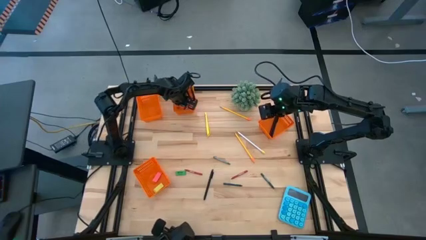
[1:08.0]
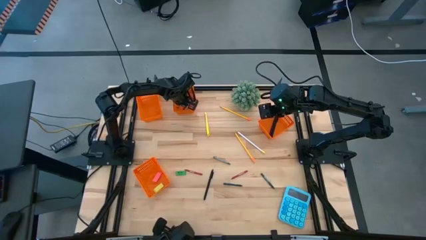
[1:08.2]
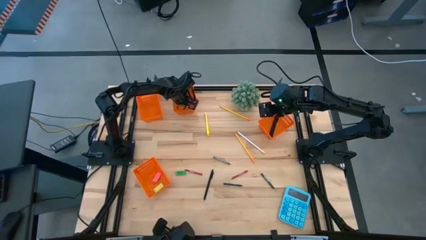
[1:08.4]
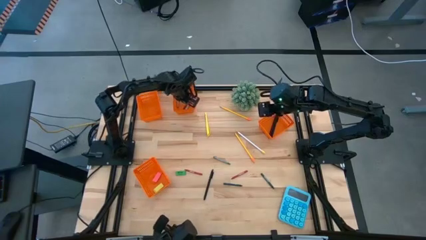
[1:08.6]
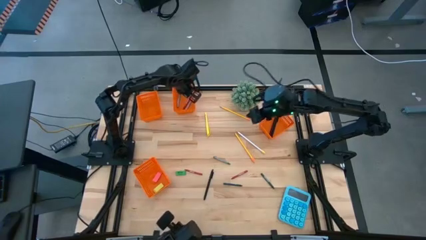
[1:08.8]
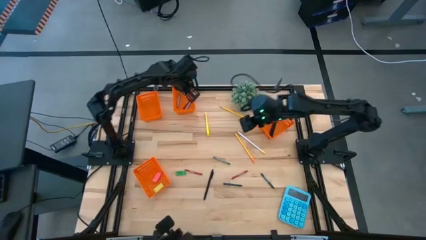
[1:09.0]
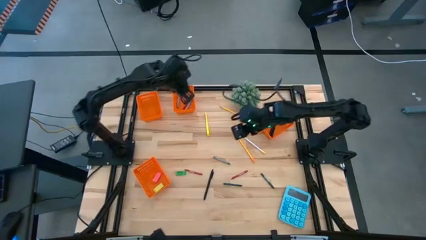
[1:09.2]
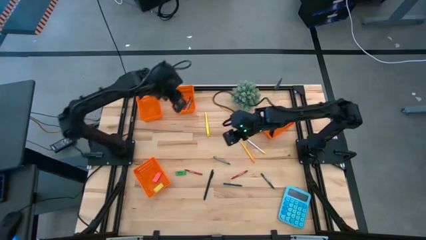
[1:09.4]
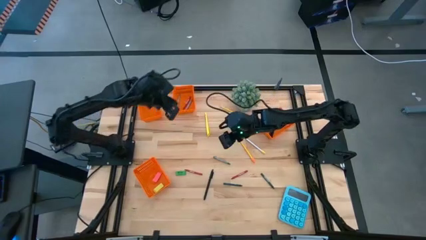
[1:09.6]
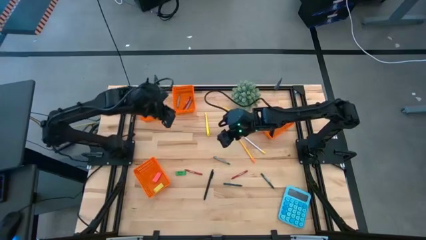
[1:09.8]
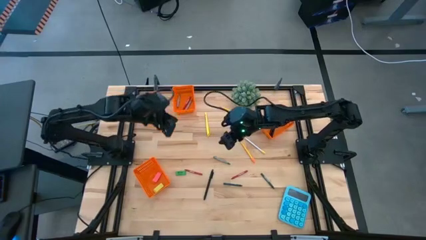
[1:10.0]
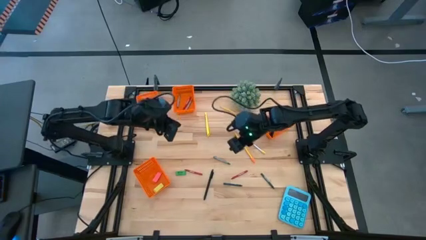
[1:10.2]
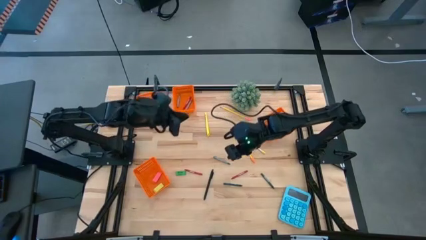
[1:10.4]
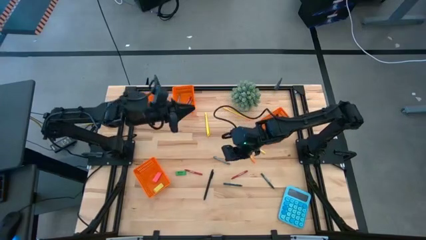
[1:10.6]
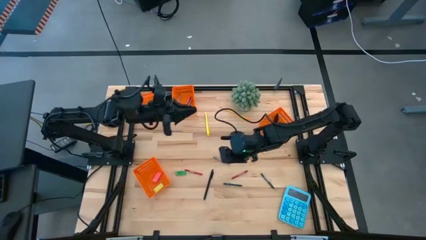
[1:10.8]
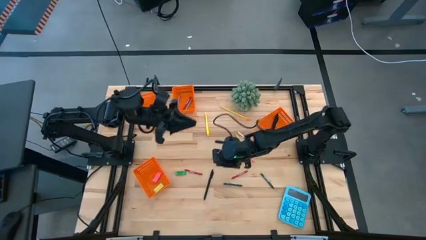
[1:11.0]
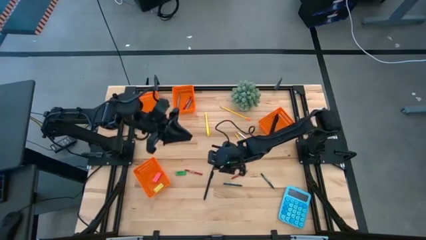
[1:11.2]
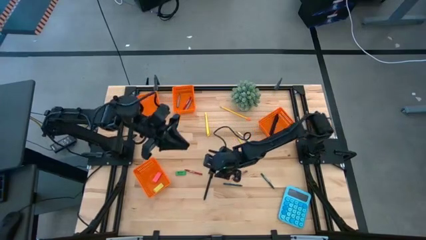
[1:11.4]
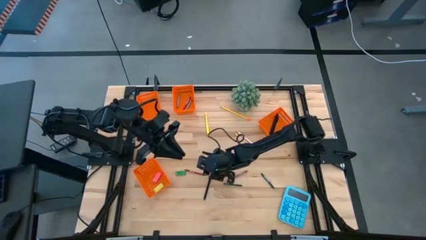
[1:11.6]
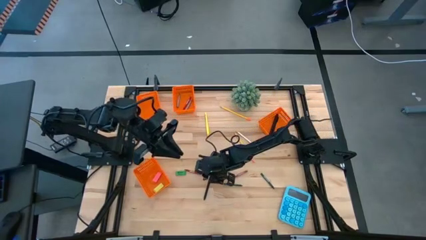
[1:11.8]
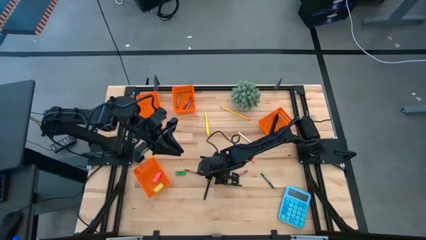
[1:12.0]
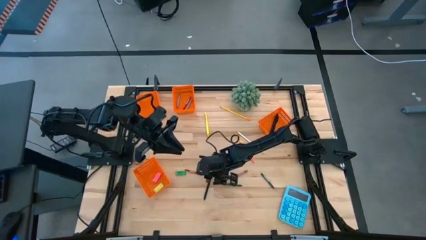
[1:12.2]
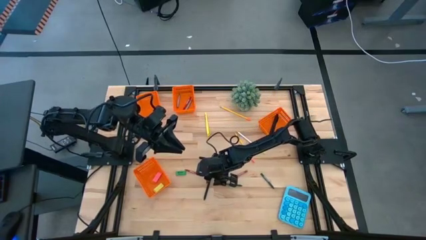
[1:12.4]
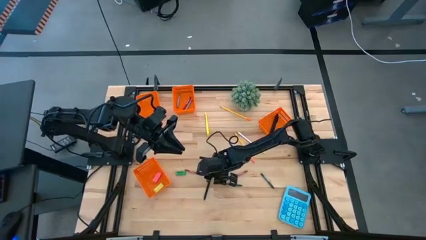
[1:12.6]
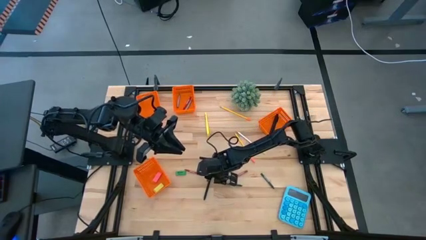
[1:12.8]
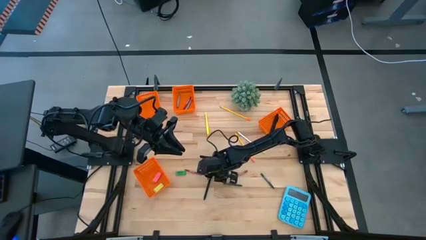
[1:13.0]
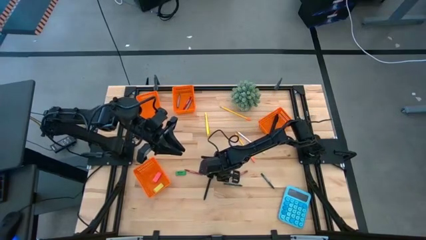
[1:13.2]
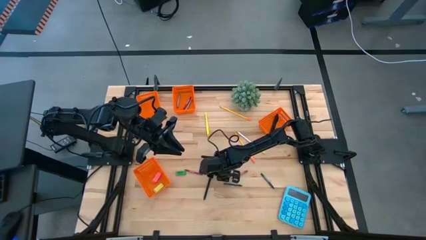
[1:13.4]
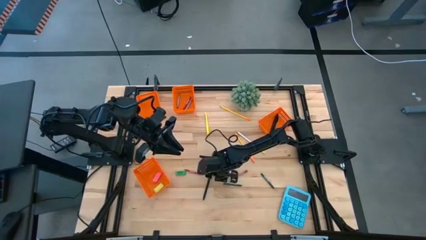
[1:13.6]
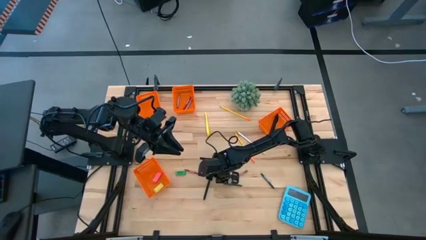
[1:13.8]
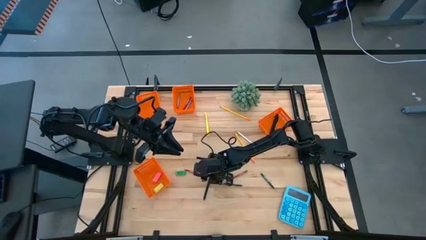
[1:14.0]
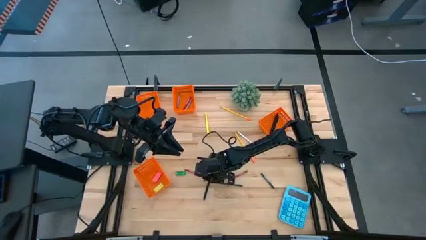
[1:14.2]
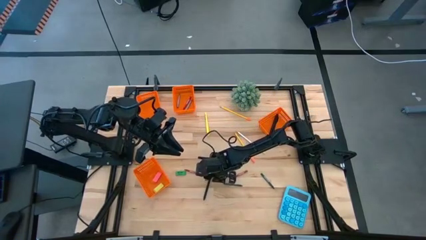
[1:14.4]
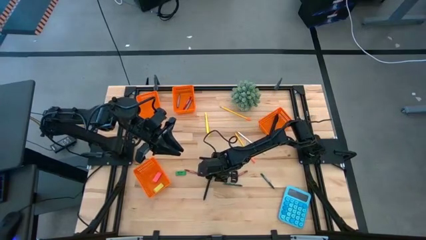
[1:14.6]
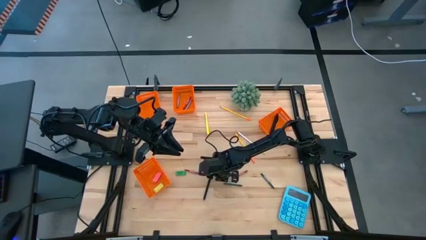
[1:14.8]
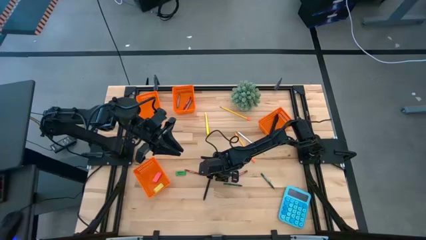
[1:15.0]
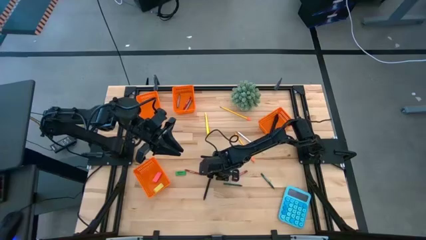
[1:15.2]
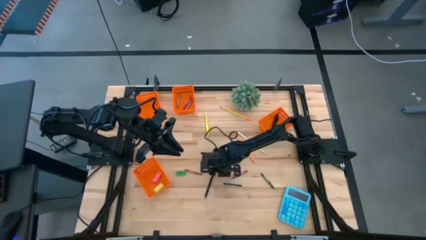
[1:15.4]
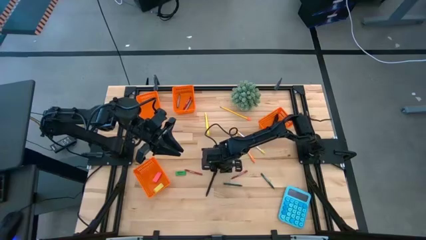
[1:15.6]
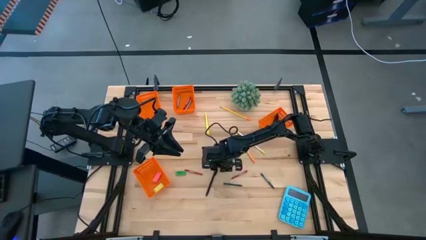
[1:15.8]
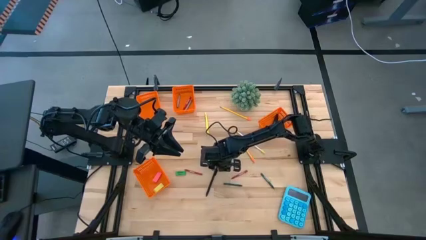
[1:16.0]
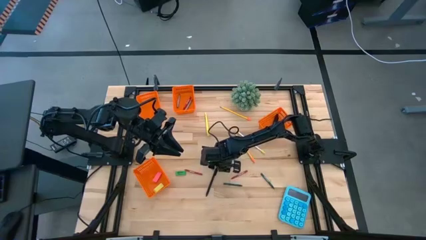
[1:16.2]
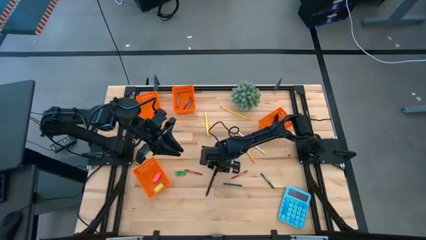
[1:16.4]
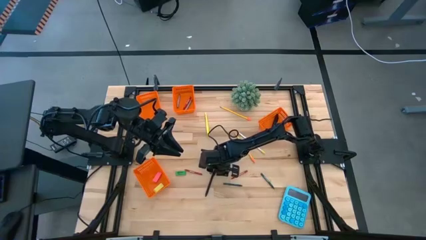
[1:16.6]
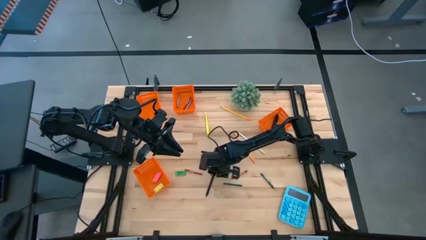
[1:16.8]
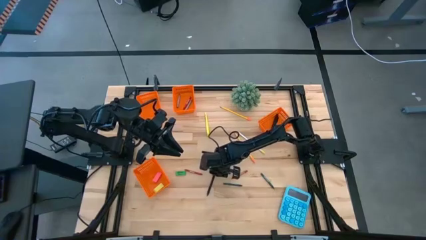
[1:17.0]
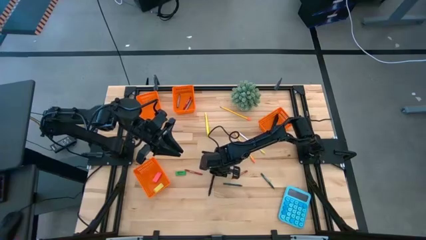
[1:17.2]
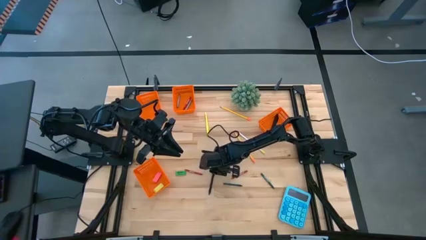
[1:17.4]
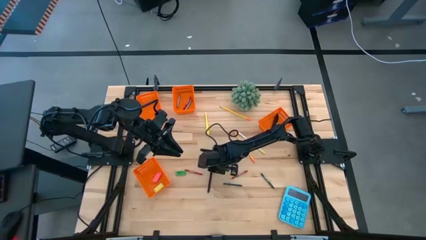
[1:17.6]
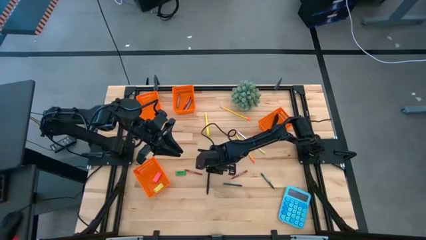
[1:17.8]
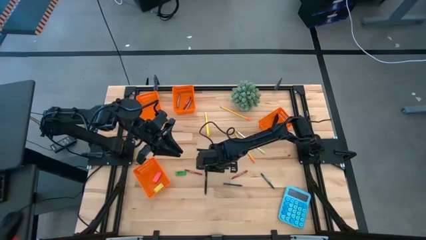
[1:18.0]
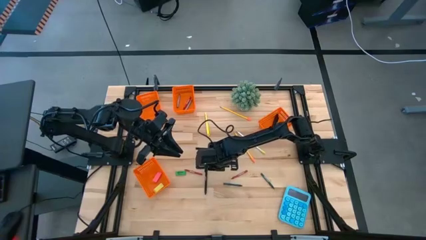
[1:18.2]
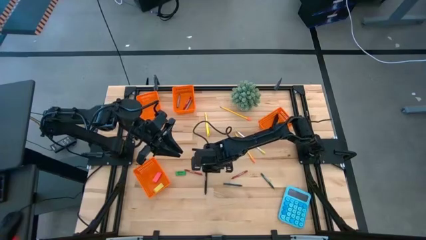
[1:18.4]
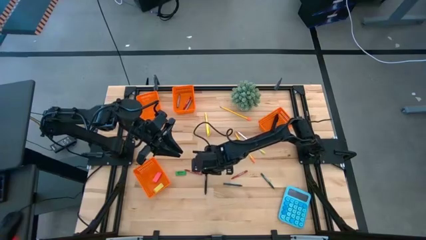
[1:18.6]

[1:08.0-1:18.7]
Task: Sort crayons/erasers/pens/pencils in bins
Put the black pen into the right orange bin

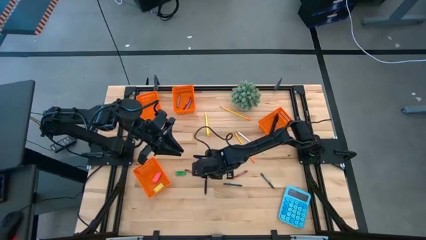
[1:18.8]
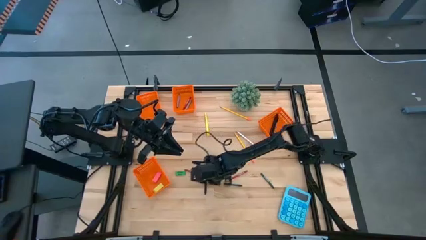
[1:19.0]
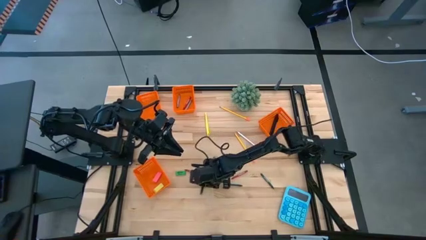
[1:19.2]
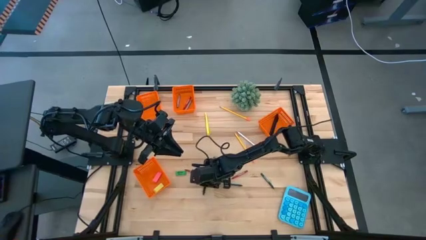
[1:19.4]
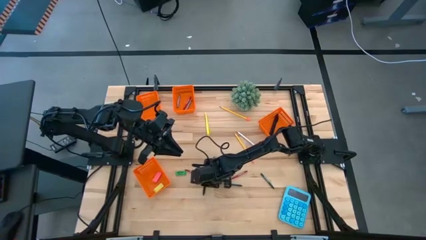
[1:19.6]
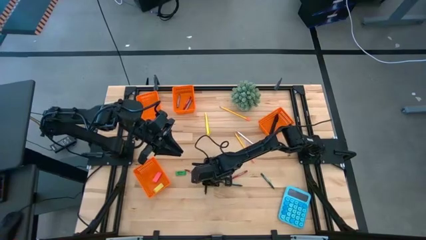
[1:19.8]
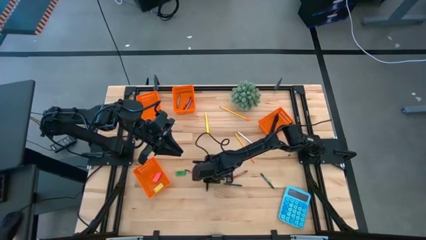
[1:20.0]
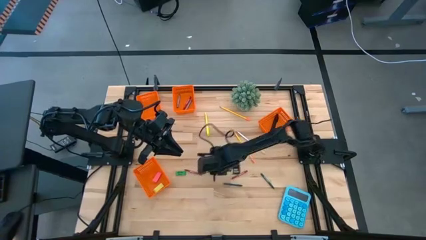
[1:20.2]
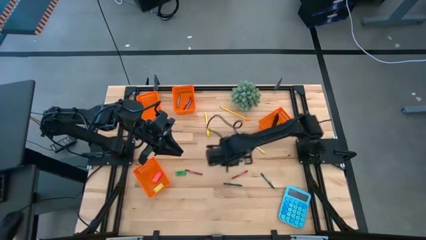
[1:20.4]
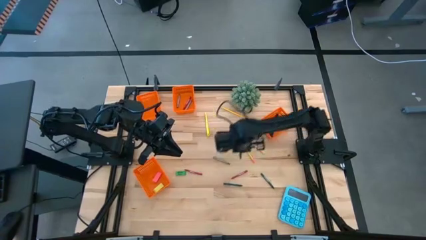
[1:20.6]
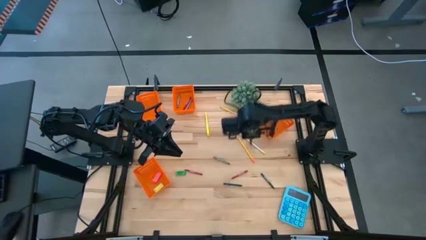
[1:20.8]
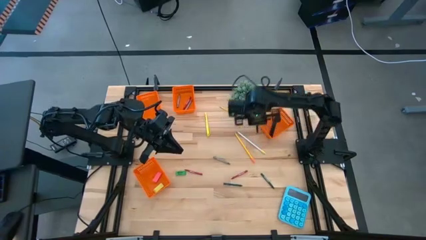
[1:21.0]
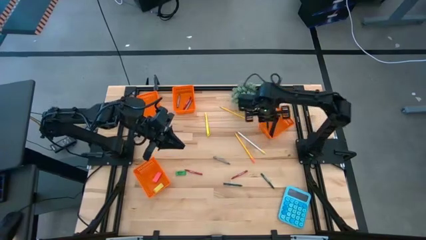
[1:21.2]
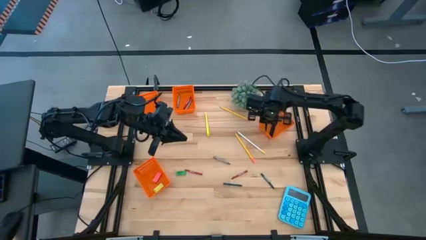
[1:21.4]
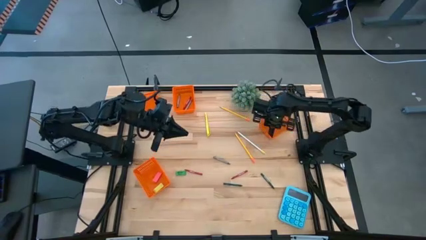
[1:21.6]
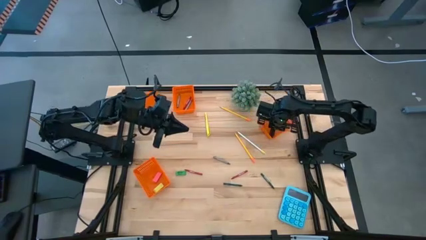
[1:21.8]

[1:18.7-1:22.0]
Put the black pen into the right orange bin
